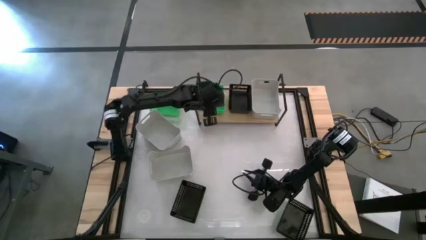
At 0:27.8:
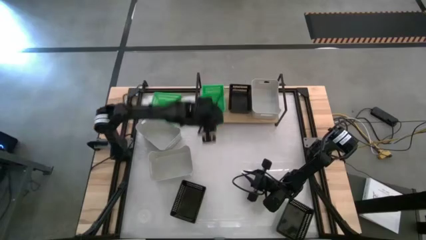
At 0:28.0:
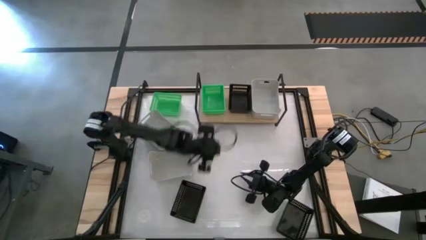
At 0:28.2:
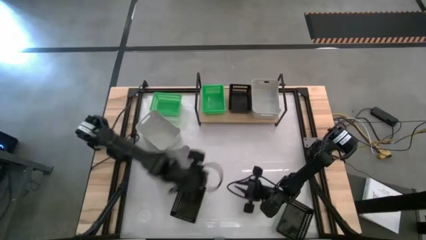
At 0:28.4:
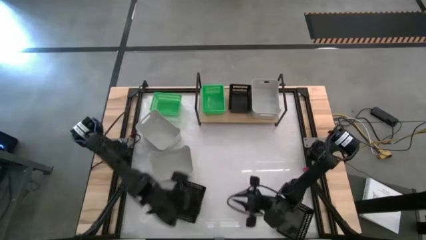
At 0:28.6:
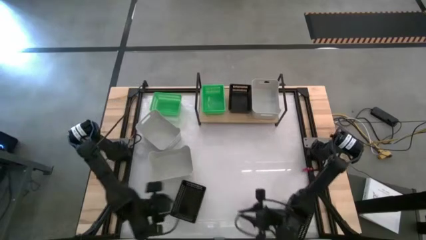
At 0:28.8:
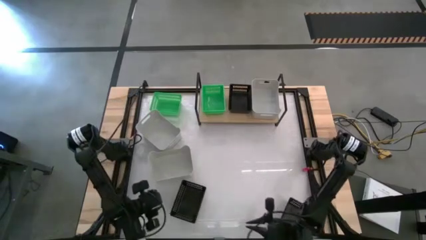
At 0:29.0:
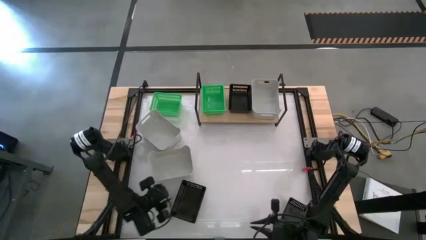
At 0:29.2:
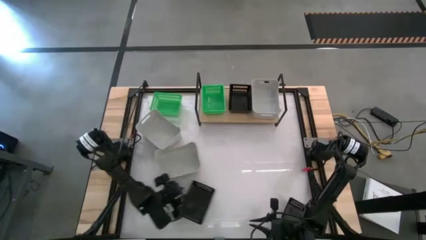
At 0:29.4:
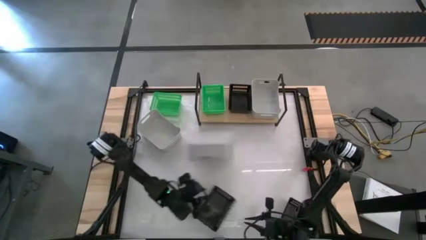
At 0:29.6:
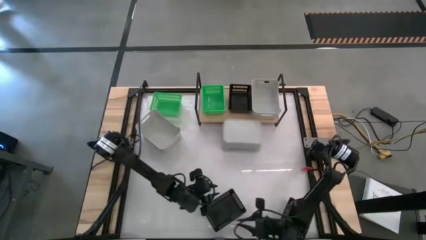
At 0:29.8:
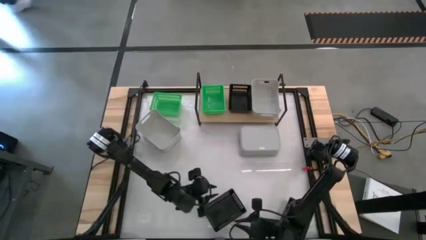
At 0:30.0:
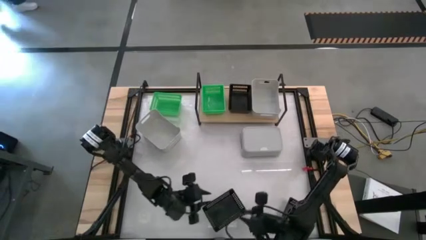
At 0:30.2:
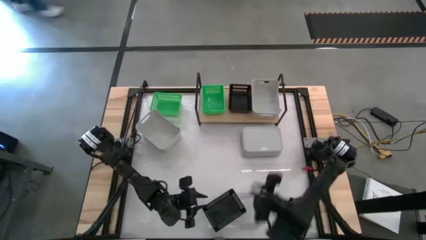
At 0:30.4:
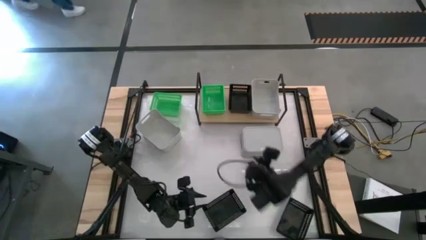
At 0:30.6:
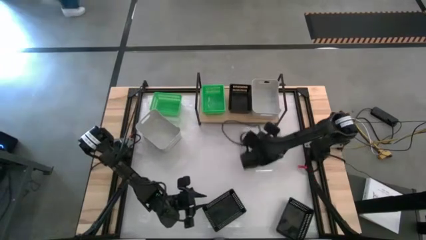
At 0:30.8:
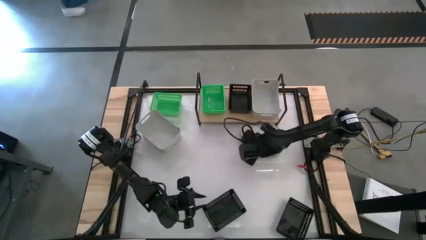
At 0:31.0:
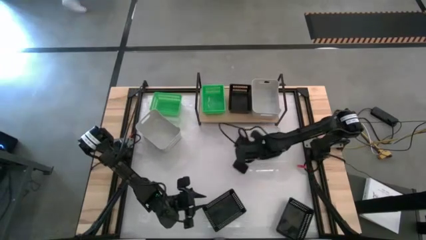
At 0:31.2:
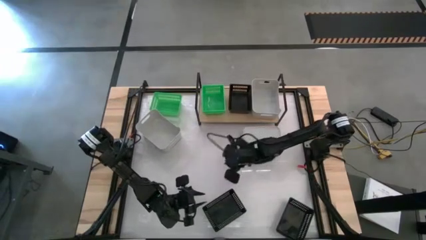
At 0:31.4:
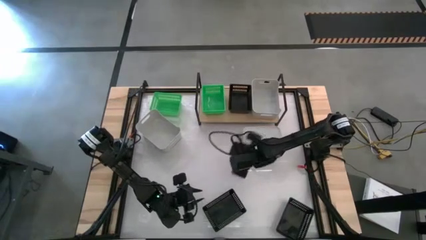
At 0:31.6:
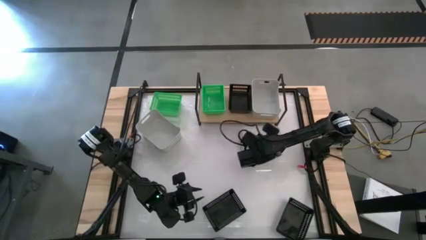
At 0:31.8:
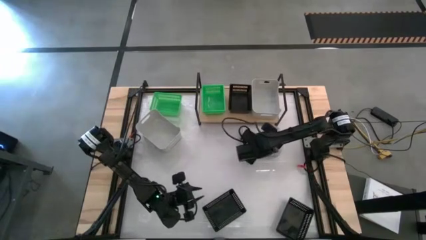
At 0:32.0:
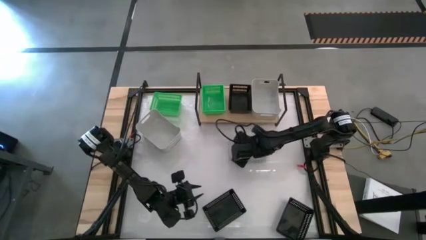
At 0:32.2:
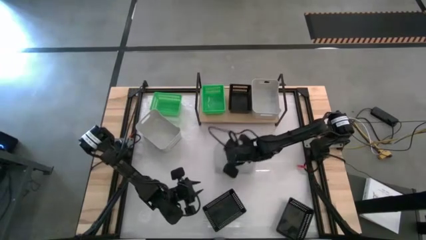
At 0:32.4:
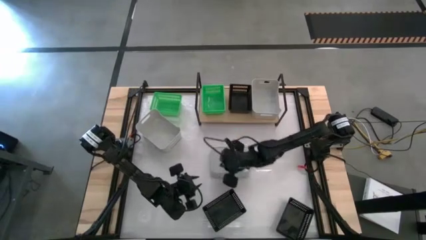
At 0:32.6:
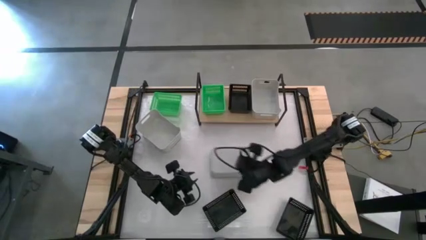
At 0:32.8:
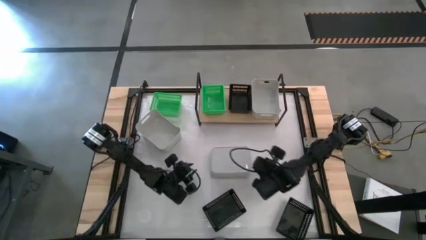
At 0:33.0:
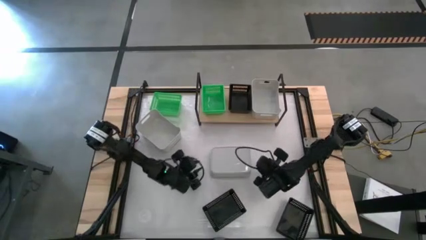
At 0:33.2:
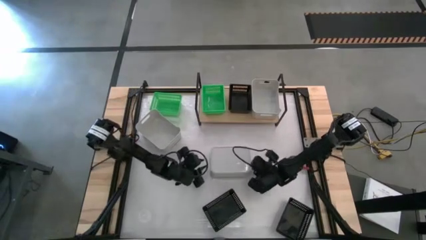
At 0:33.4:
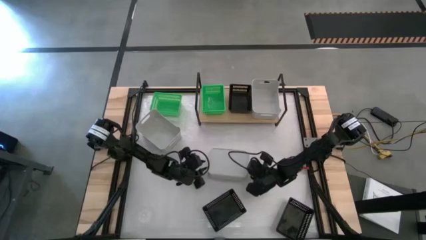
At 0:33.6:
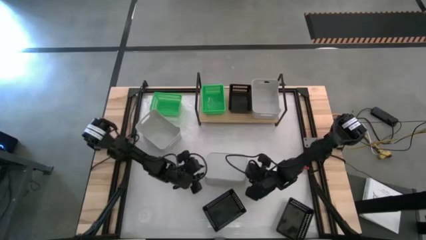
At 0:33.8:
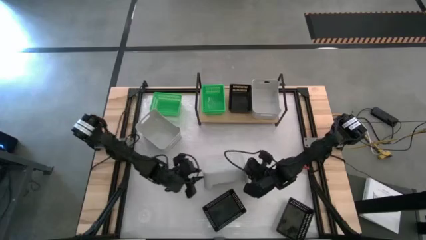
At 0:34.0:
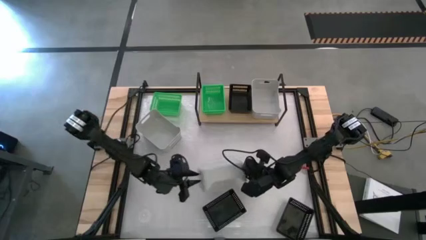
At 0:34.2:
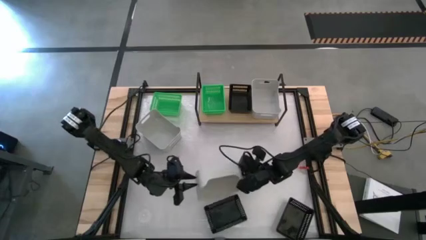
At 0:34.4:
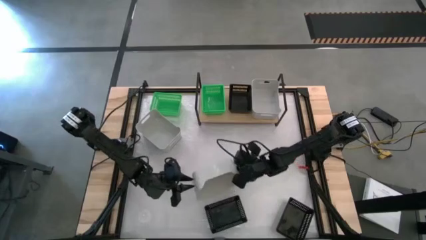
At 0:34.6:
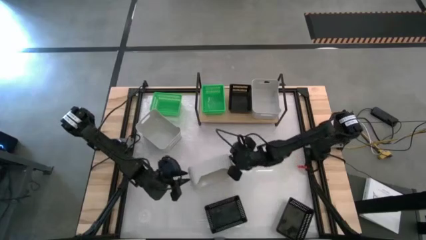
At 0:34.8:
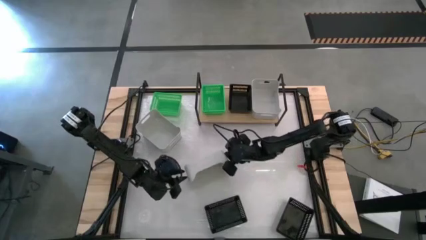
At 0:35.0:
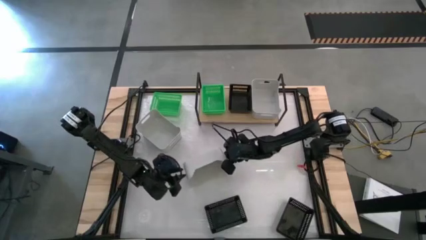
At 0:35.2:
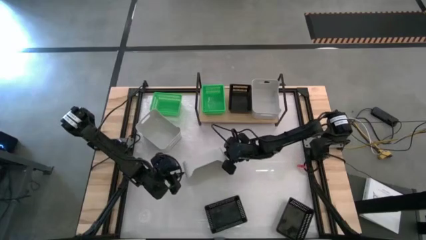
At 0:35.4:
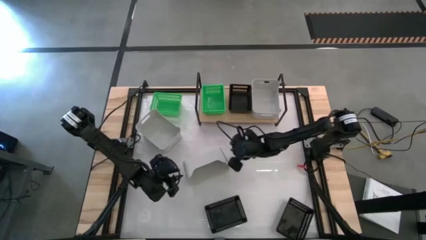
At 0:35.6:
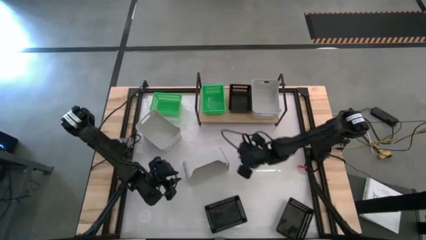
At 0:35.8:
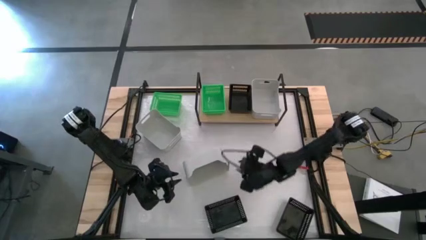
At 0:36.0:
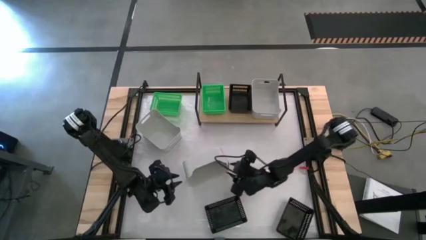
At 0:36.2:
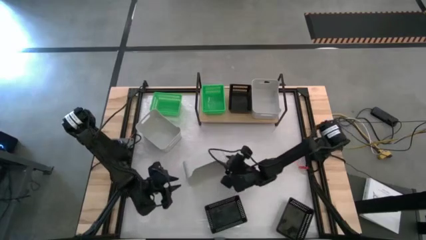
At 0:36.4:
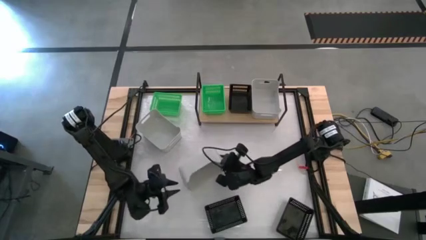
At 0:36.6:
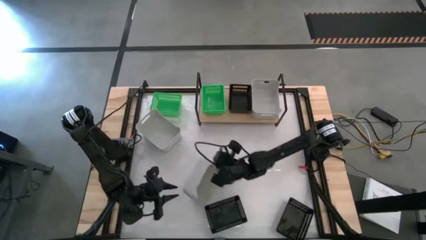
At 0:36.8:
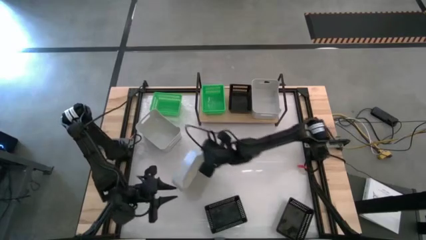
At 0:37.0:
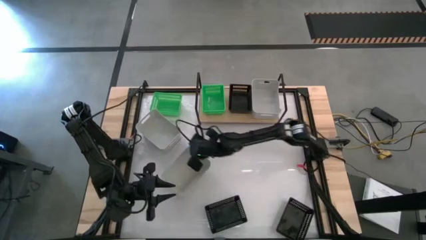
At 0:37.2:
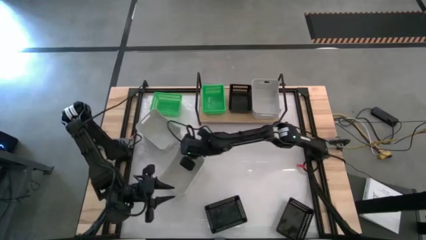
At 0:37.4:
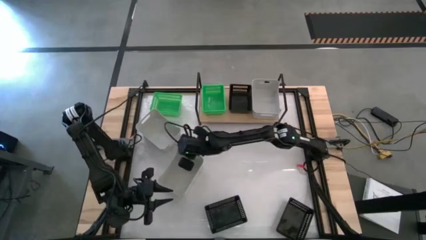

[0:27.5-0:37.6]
Task: Stack baskets on shelf by color
Adjust the bottom gray bin

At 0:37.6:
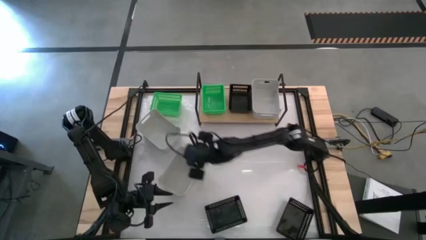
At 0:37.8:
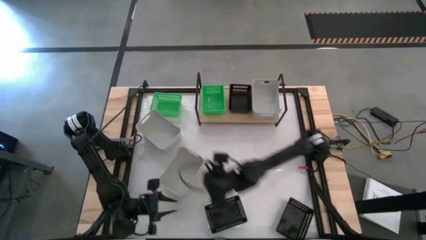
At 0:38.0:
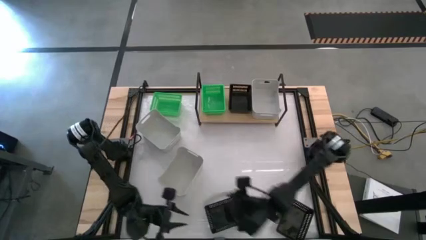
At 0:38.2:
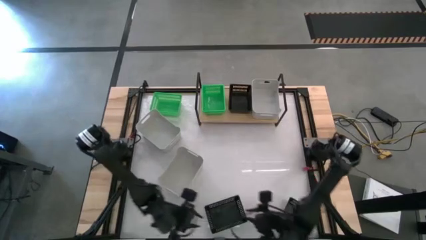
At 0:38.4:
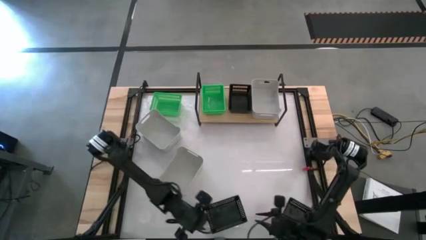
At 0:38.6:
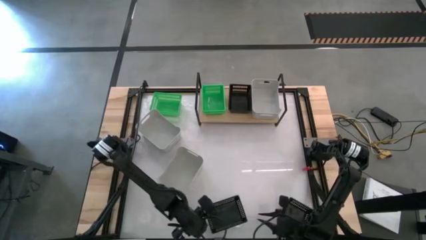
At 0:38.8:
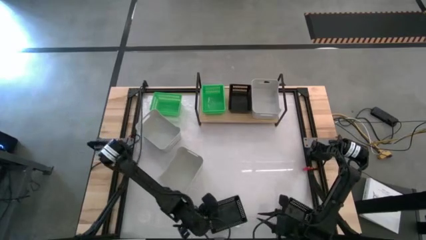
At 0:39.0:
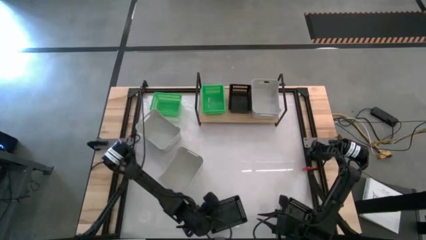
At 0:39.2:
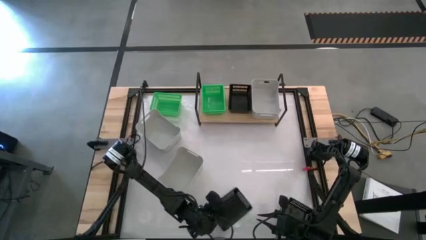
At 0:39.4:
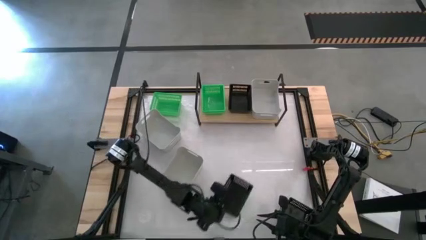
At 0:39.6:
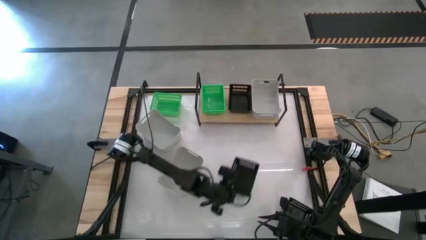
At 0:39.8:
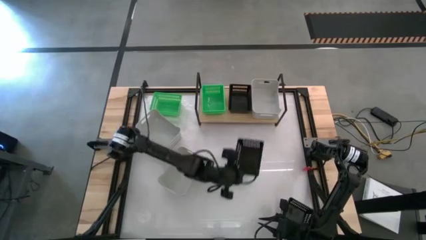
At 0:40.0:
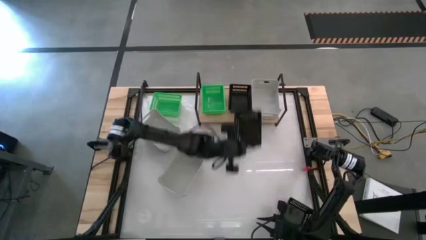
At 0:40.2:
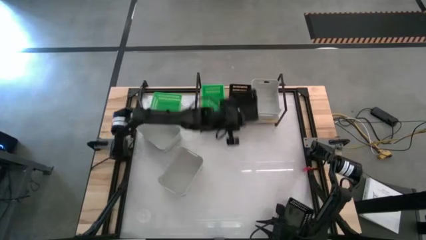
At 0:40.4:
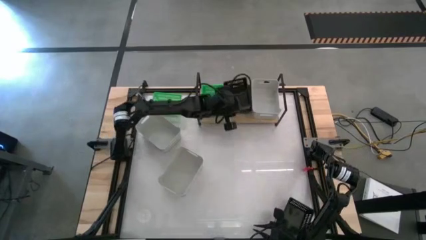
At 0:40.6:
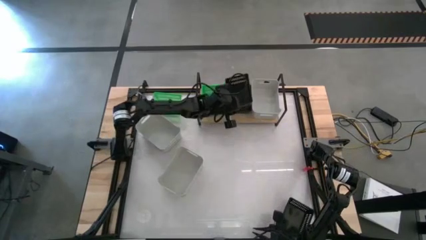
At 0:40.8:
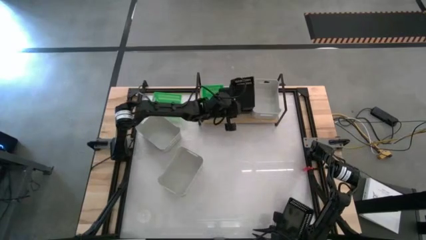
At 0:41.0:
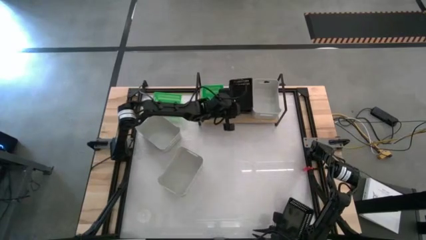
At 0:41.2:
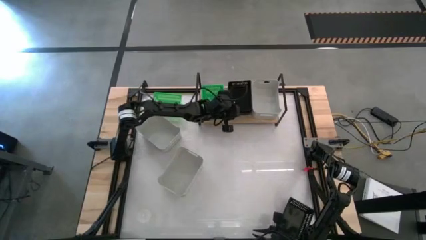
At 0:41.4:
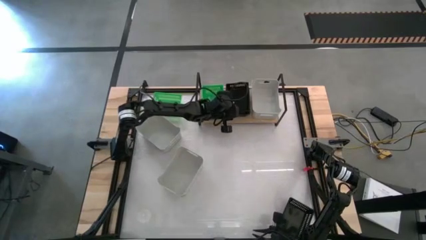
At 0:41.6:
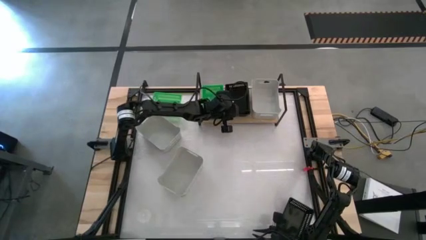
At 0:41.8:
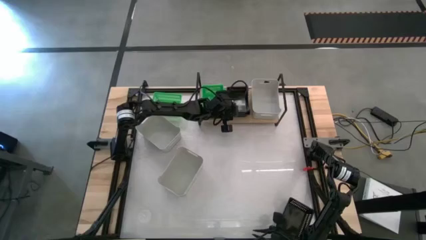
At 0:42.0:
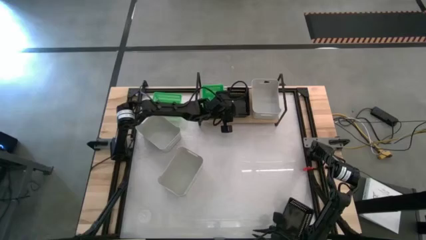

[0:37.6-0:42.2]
Stack the left black bin on top of the other black bin on the shelf

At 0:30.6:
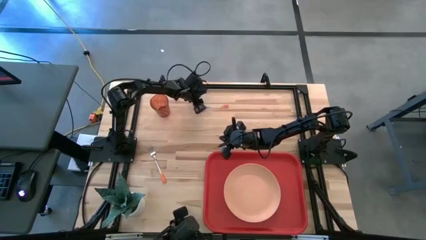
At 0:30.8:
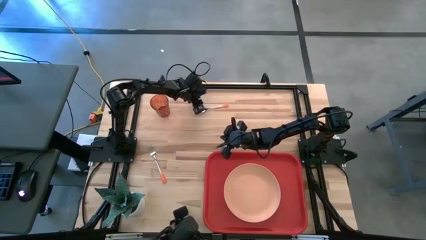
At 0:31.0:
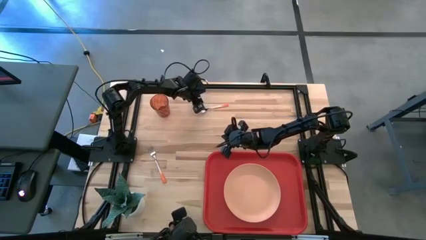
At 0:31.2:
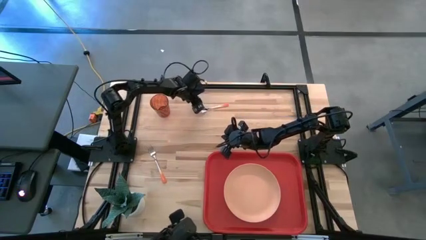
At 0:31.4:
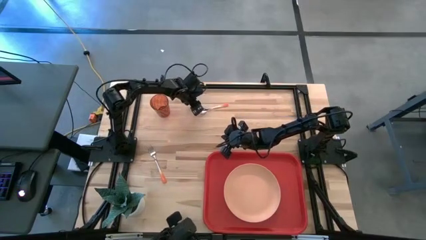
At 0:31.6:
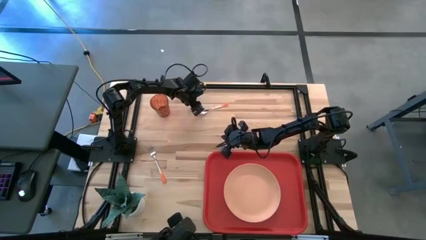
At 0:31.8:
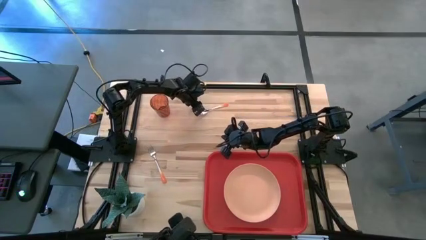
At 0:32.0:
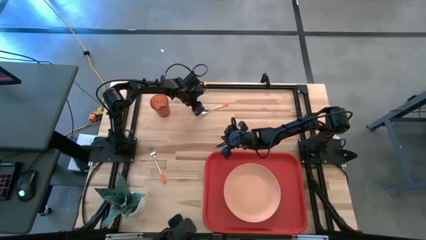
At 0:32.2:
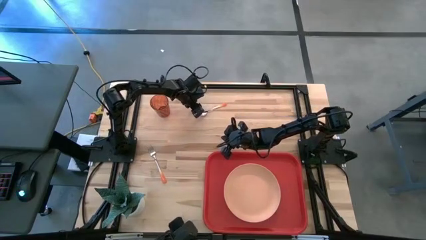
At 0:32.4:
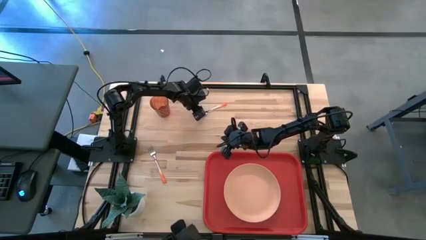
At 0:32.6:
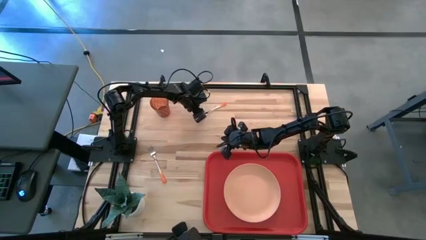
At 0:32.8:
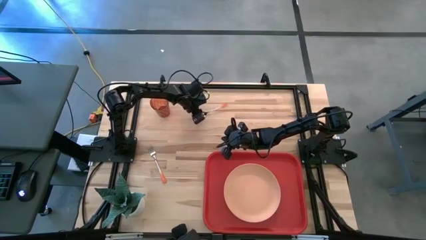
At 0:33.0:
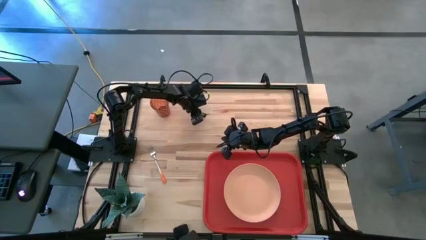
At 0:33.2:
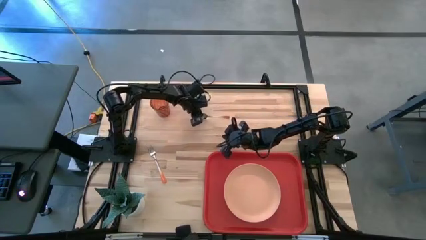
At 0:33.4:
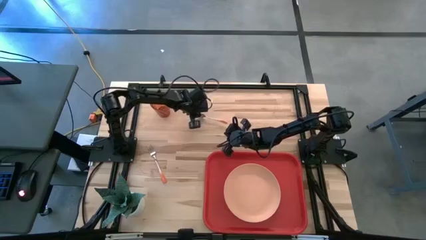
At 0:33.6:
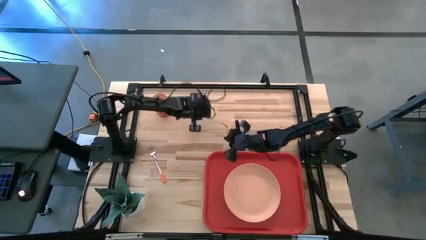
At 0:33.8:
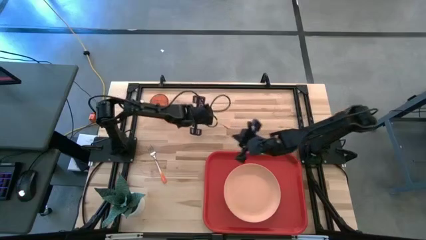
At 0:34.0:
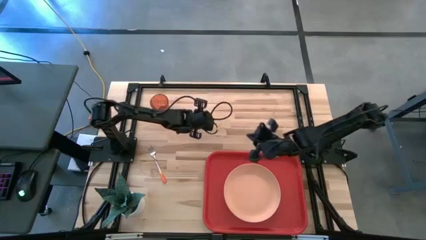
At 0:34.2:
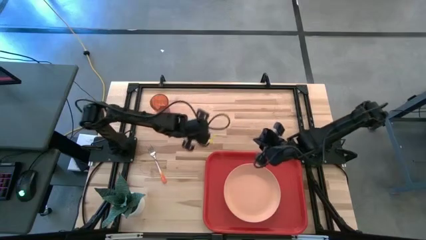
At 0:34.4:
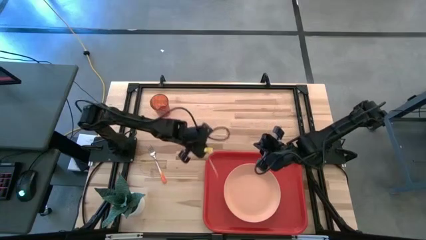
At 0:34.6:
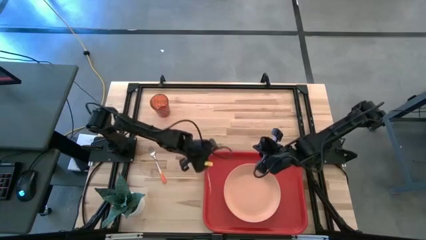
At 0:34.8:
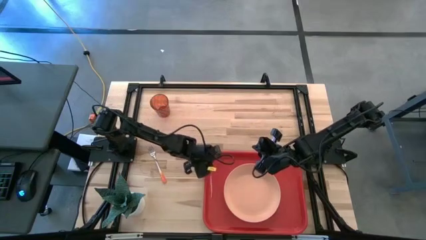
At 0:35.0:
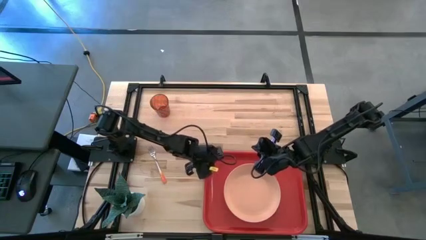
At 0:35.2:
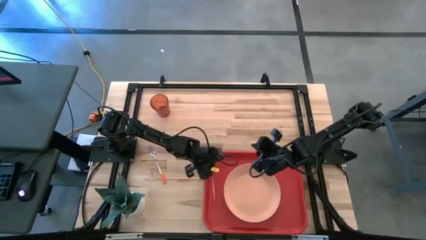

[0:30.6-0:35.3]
Task: Pick and place plate/cup/fork/spoon on tray
Put the orange spoon on the red tray to the left of the orange plate
